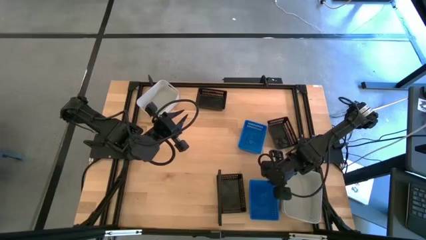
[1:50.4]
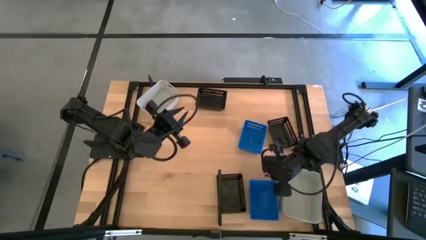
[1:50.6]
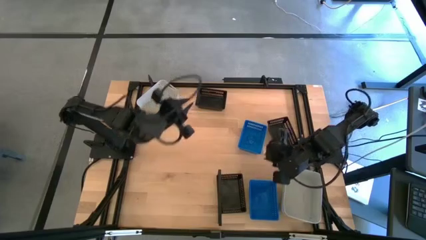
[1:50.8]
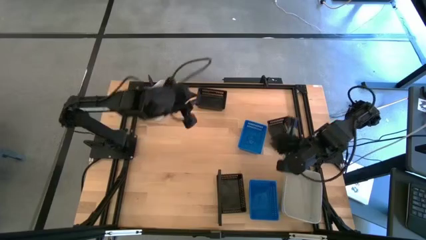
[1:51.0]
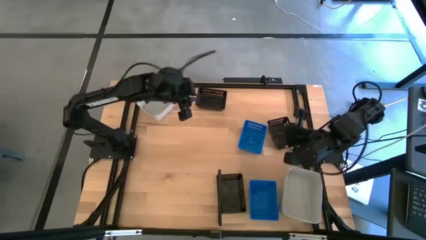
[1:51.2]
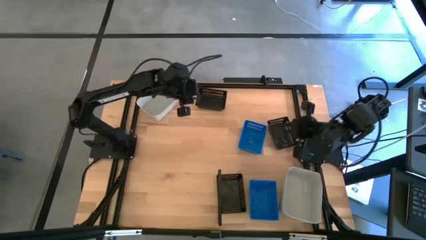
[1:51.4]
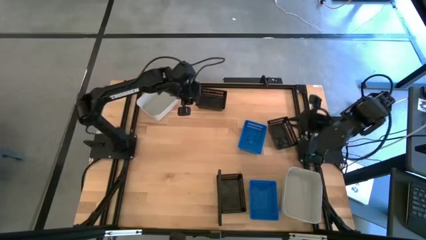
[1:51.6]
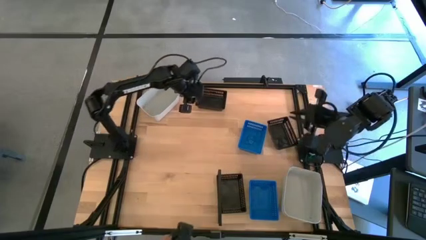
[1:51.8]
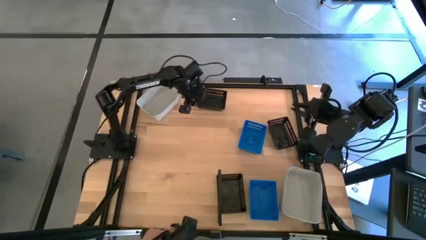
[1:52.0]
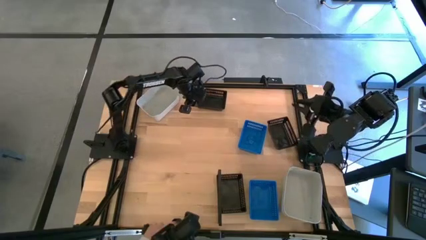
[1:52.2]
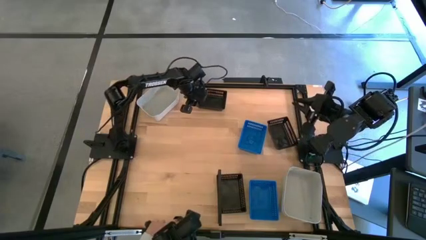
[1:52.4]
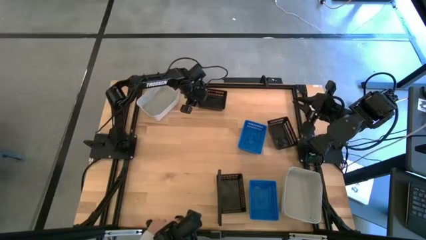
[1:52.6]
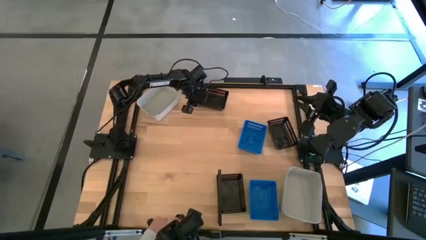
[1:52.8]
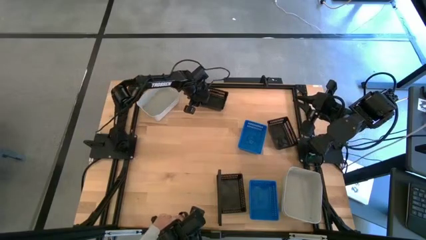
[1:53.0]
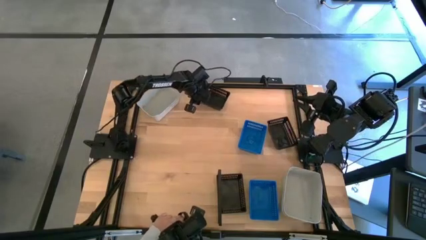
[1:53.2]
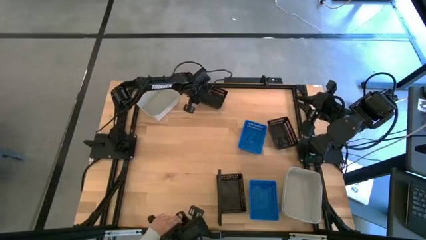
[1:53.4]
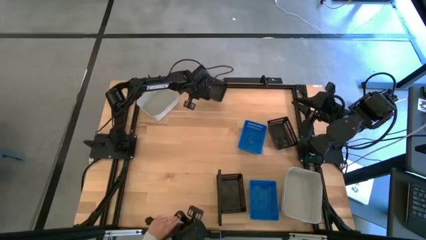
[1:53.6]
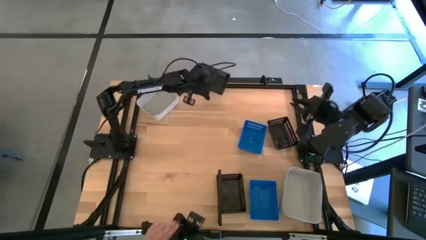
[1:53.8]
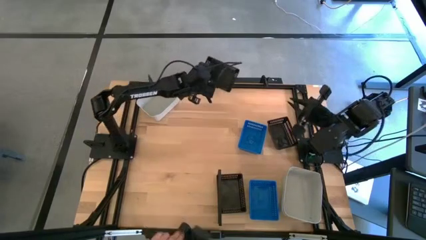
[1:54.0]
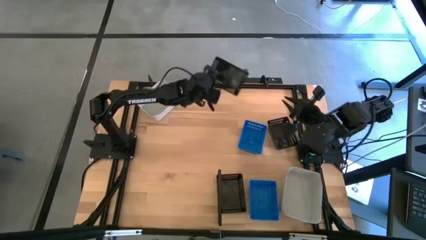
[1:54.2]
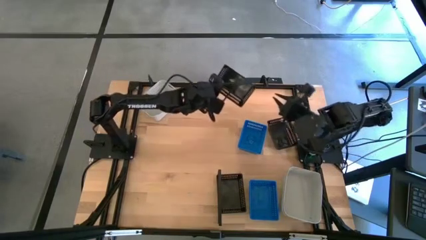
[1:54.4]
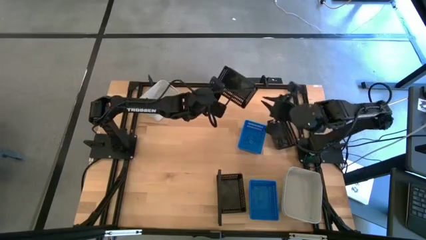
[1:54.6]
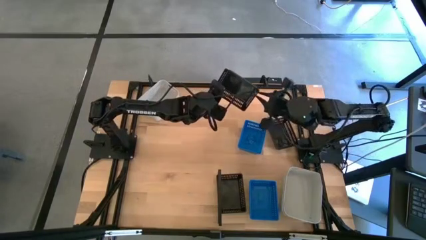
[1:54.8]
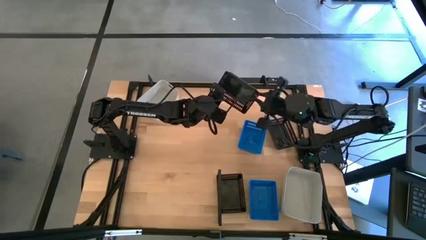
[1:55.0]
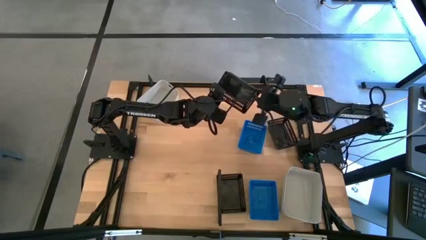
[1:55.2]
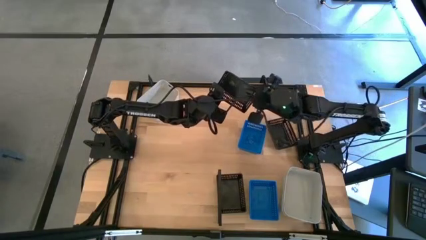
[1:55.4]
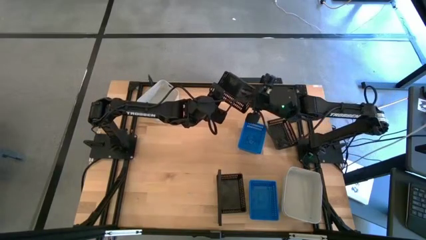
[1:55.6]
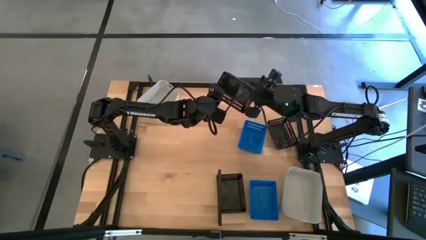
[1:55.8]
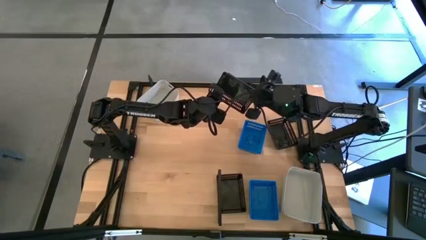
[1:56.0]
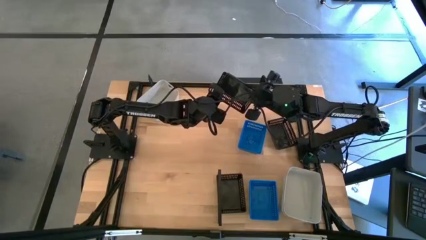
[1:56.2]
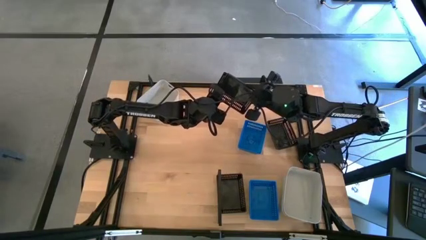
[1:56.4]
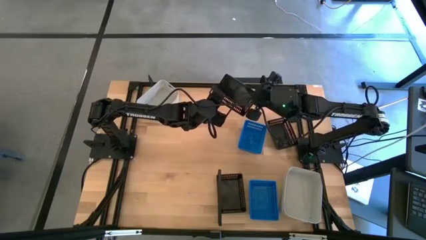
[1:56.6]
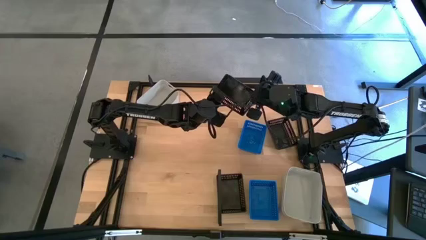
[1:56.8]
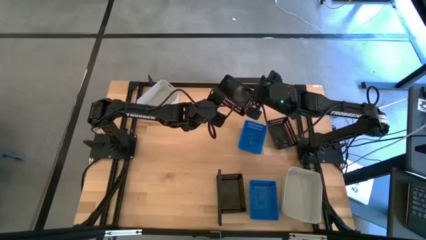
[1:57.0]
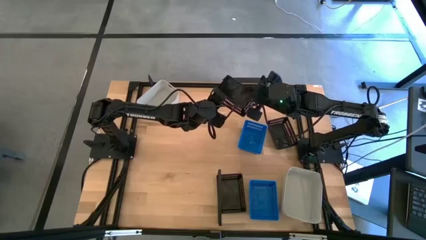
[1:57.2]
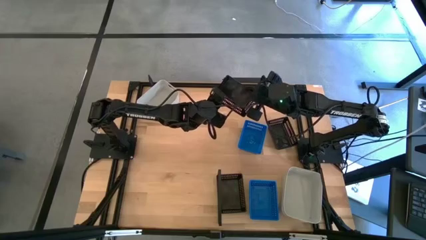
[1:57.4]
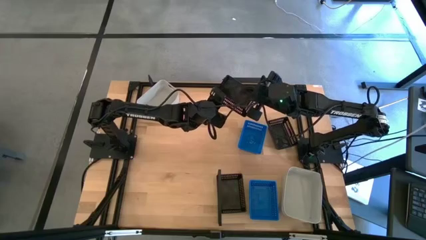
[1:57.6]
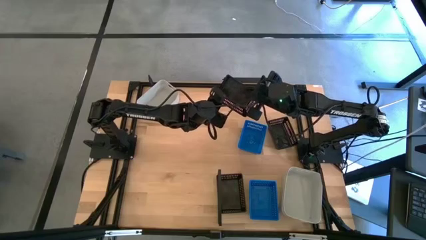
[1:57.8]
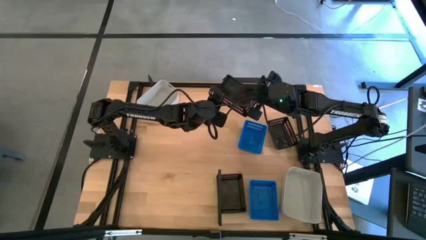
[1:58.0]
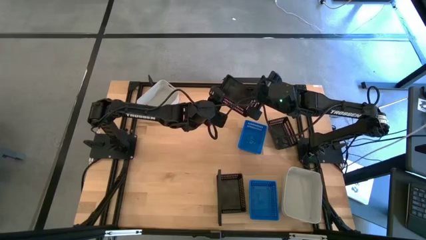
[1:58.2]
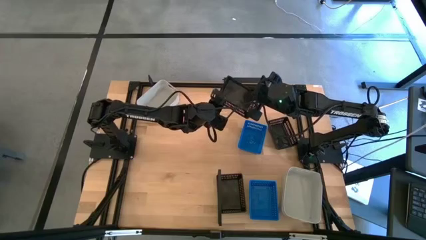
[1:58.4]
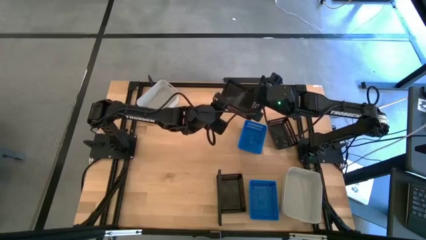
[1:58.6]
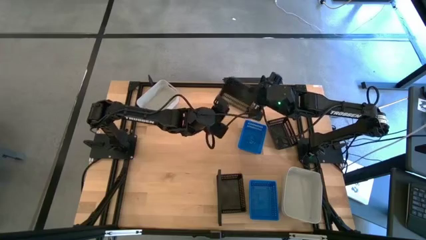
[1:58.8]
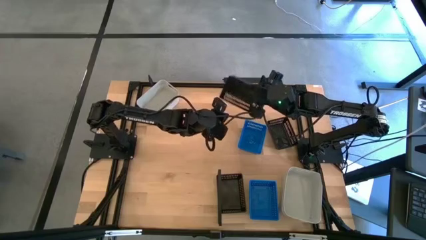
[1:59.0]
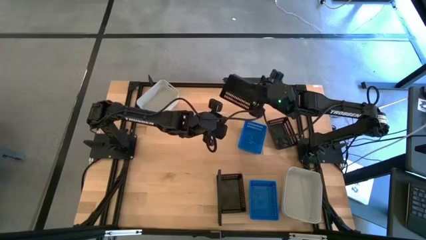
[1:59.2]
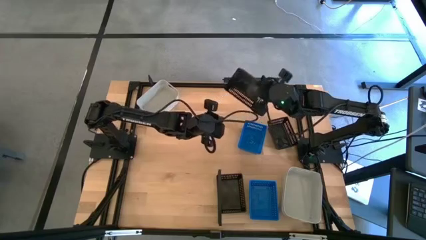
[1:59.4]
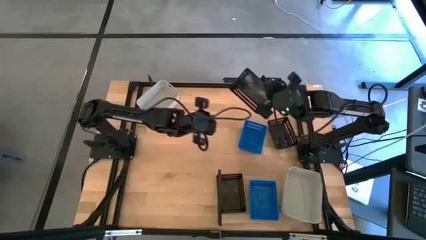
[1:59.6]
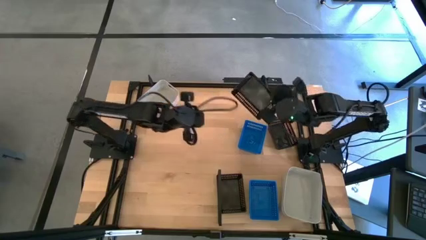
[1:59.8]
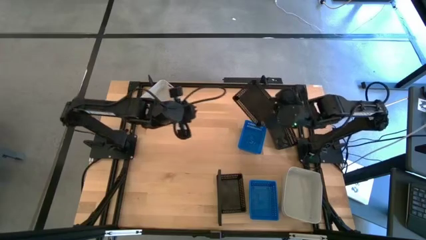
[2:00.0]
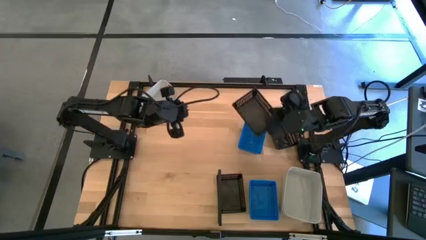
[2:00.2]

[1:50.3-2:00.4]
Task: Stack baskets on shelf by color
Stack the top black bin on top of the black bin on the shelf

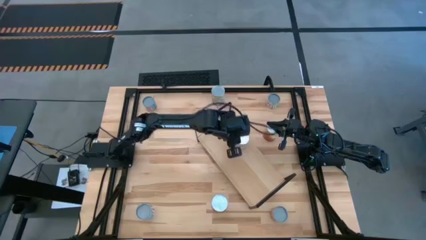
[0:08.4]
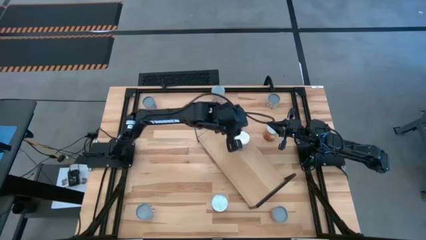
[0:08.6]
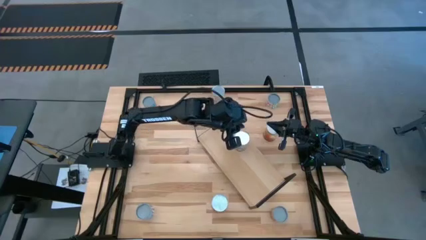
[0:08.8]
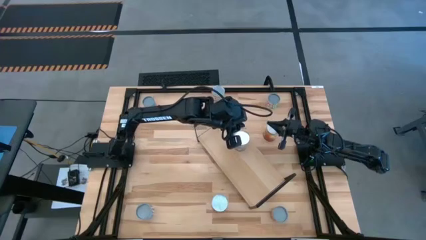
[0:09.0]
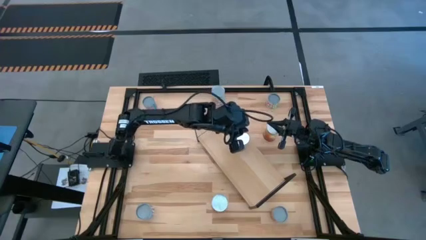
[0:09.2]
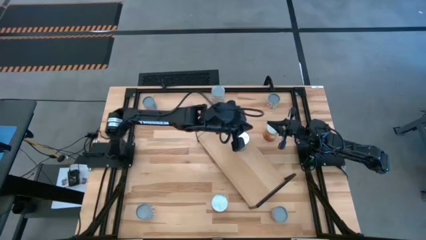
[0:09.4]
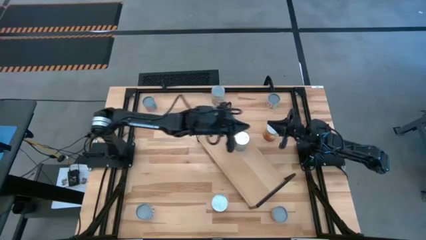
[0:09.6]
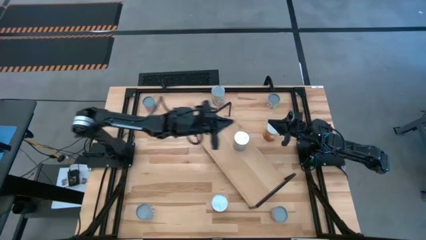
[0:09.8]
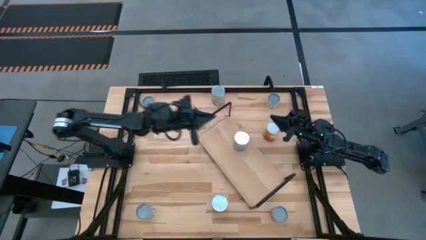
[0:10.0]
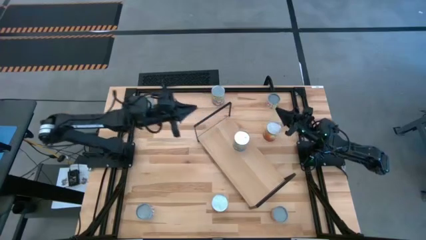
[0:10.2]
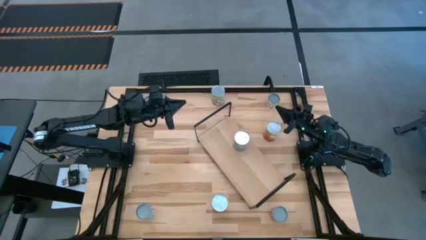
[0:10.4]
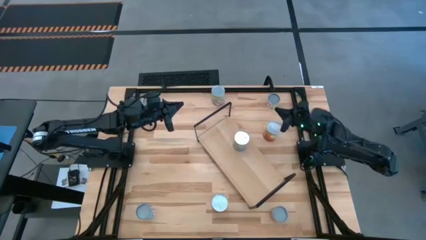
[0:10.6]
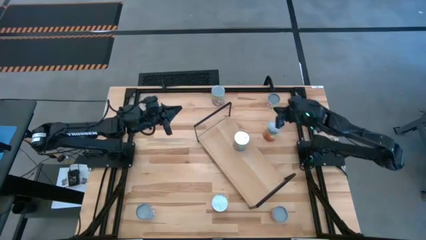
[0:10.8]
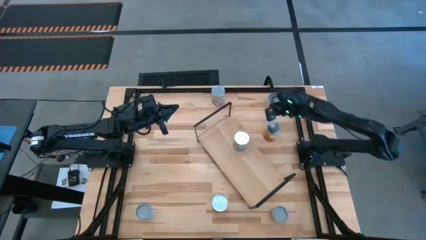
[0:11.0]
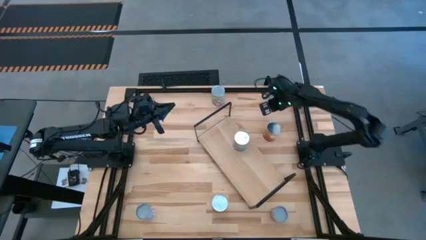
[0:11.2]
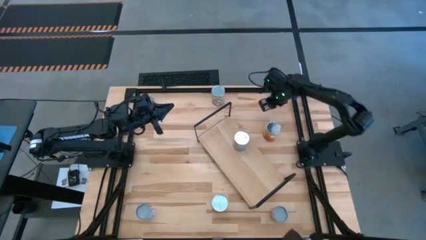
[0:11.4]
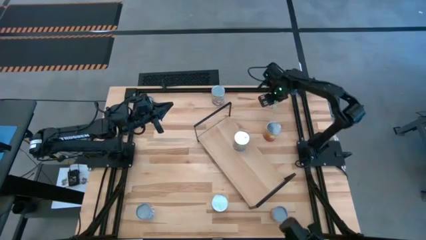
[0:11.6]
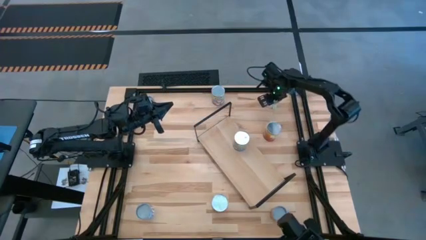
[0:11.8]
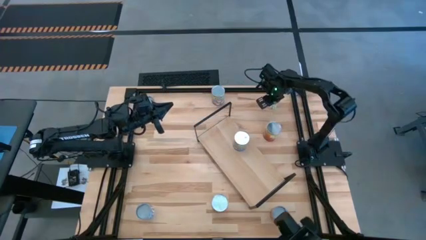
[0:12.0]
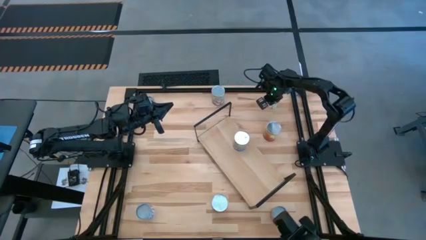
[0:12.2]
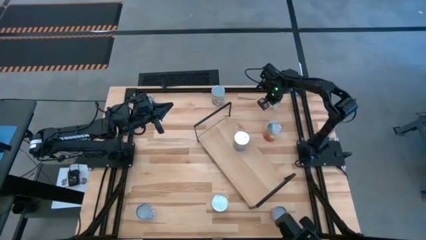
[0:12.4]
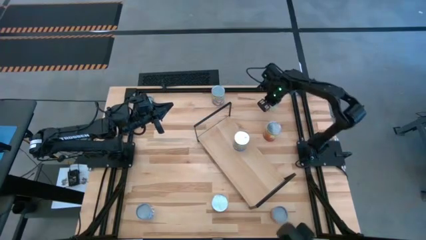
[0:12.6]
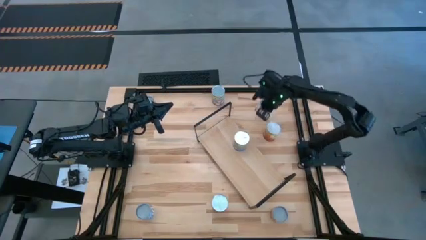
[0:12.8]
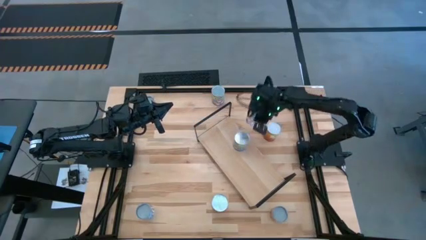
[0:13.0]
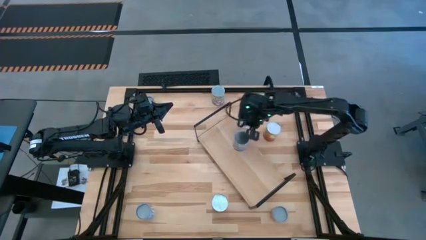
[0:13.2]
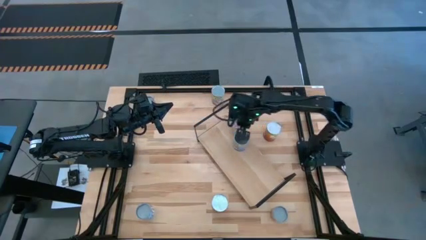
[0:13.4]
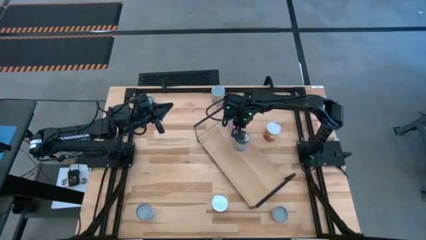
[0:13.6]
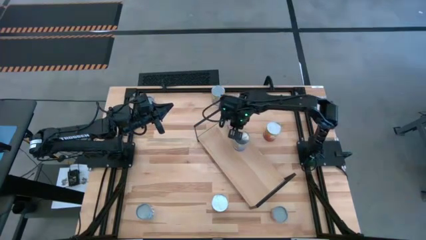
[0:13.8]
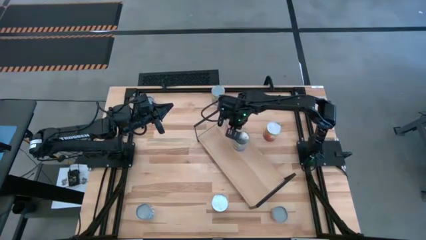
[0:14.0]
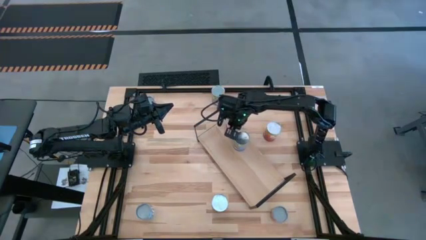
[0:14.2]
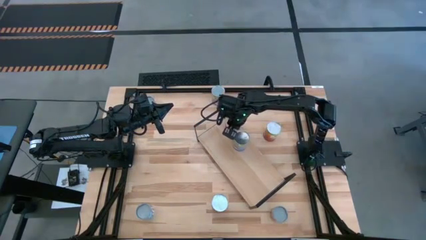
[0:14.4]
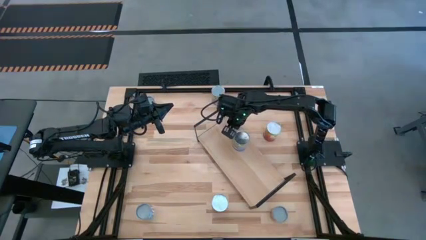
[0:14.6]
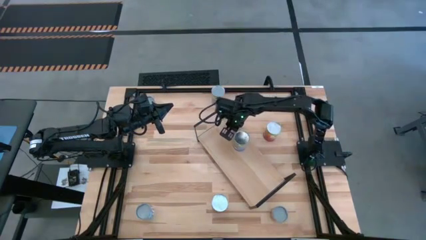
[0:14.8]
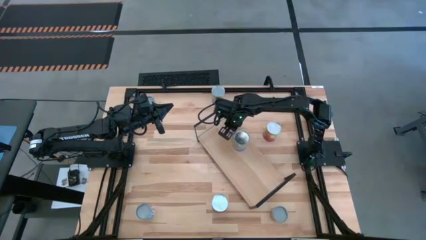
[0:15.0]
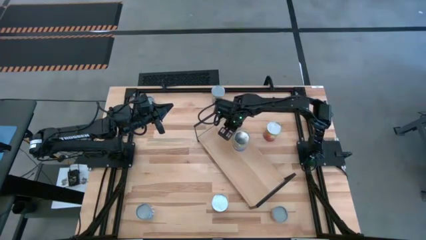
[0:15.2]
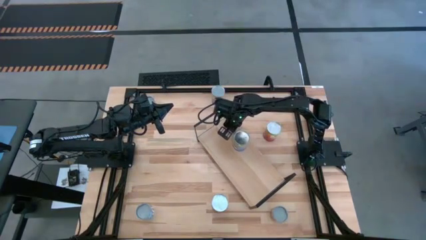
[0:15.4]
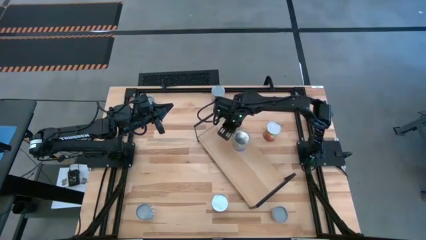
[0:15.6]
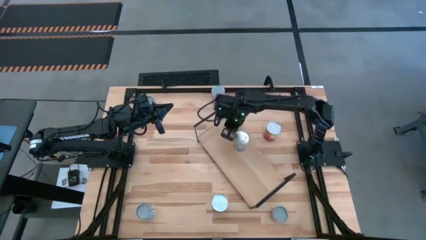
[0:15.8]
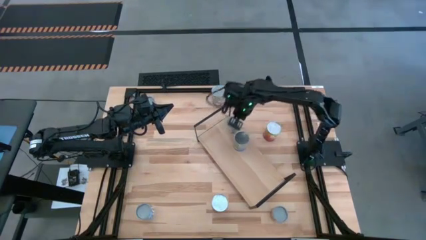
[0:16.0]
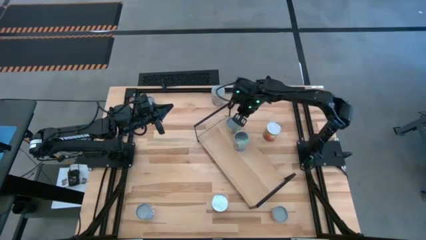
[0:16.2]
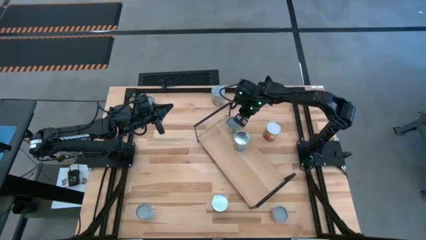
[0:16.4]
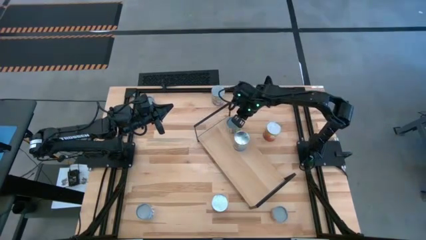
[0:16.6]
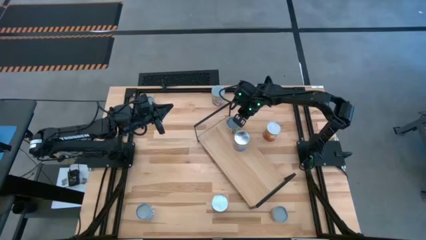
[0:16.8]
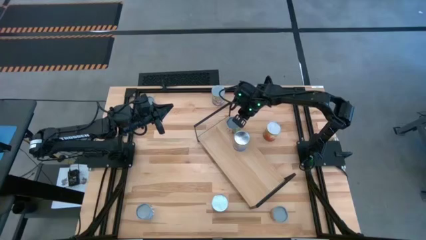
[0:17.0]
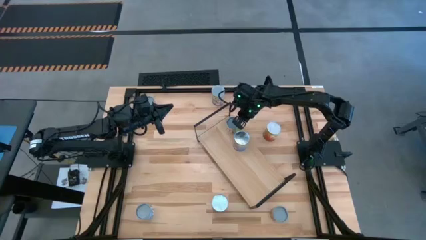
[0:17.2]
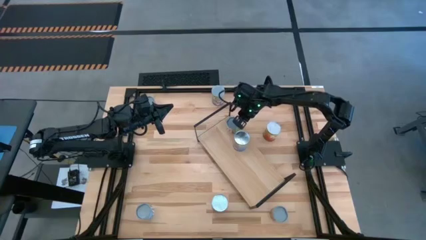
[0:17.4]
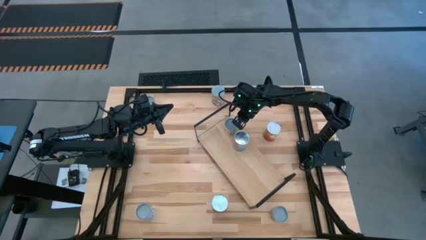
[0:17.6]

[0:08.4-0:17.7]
Task: Pick and place cans onto a shelf
Put the canned peas on the shelf
